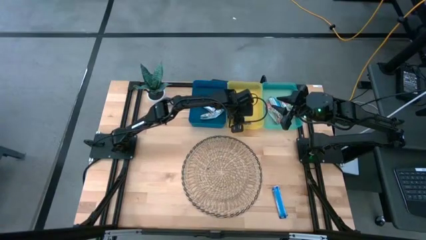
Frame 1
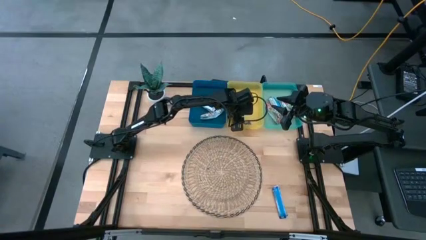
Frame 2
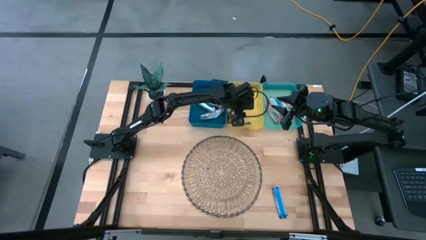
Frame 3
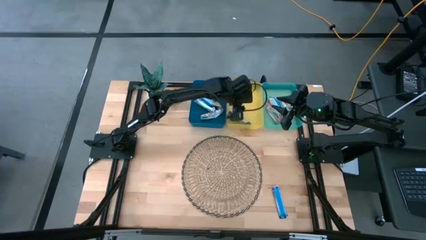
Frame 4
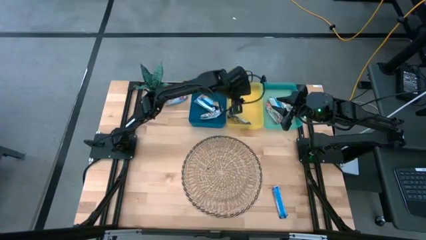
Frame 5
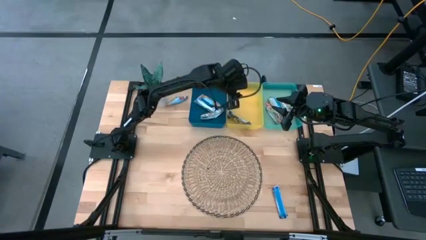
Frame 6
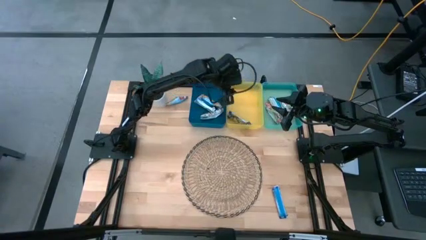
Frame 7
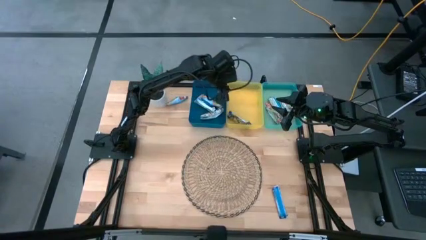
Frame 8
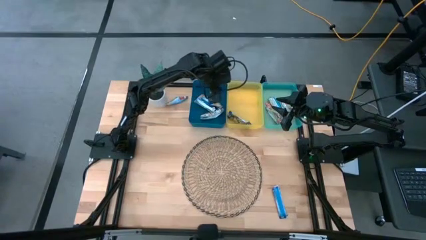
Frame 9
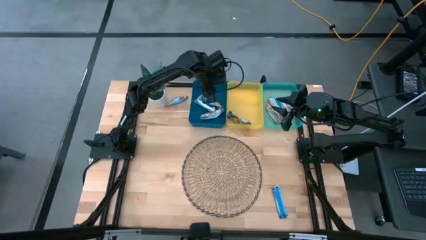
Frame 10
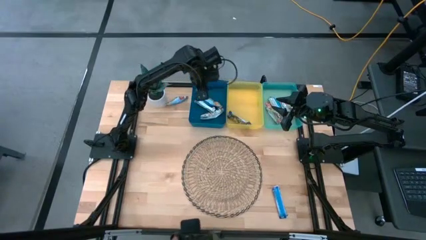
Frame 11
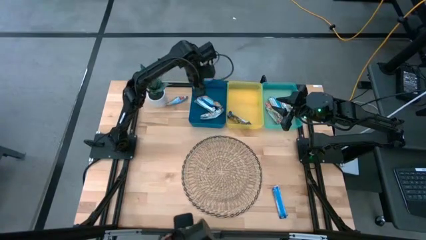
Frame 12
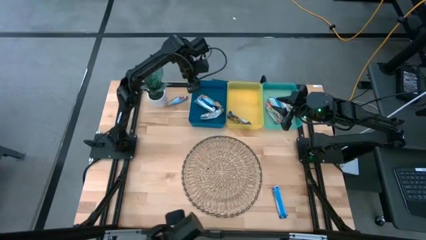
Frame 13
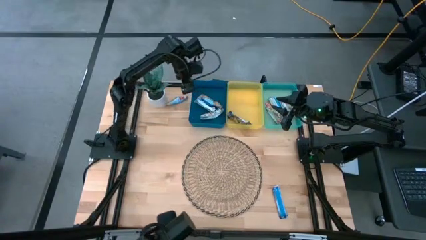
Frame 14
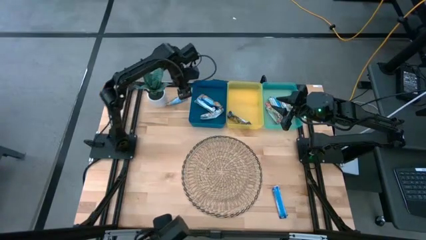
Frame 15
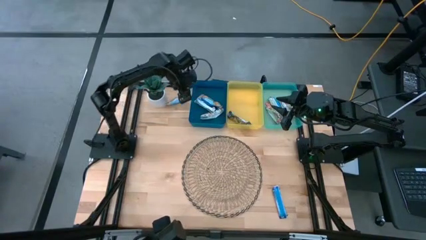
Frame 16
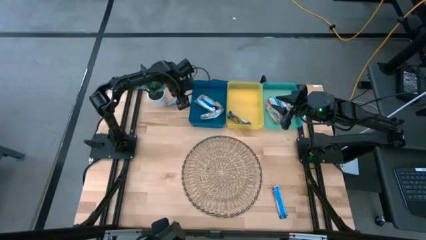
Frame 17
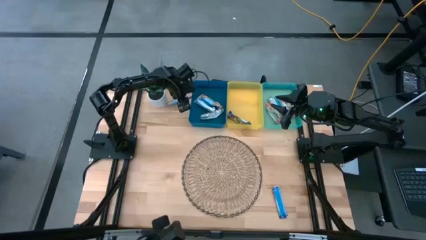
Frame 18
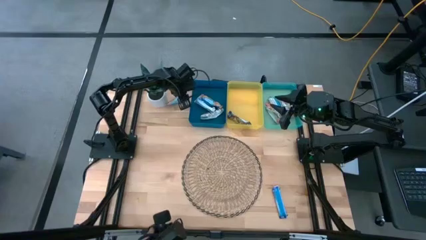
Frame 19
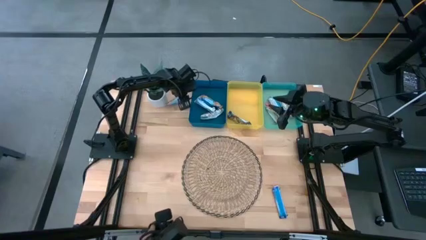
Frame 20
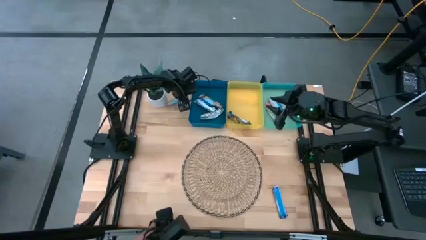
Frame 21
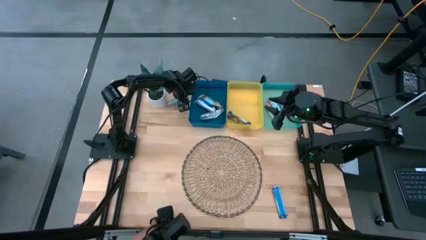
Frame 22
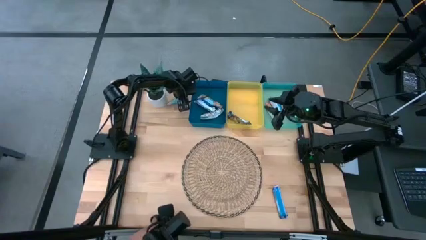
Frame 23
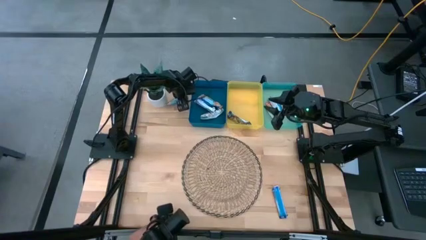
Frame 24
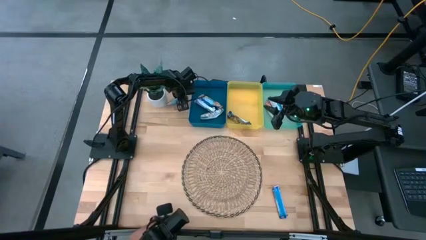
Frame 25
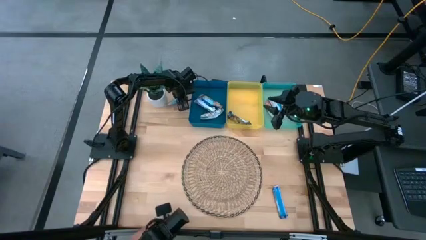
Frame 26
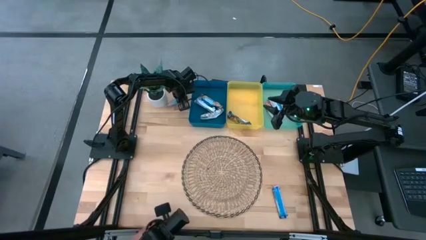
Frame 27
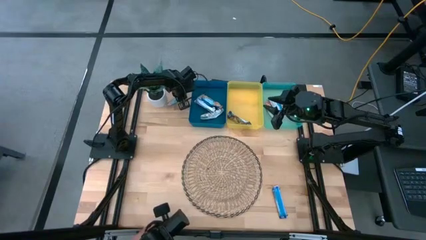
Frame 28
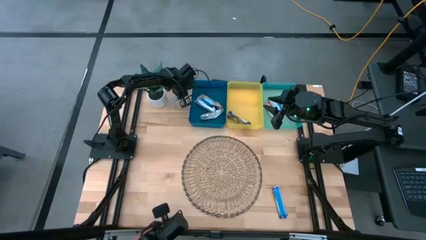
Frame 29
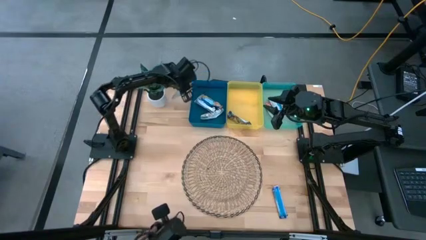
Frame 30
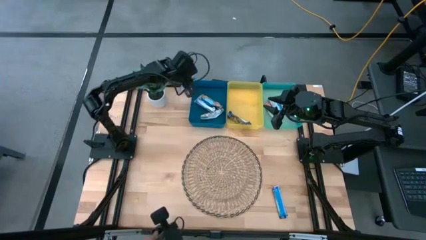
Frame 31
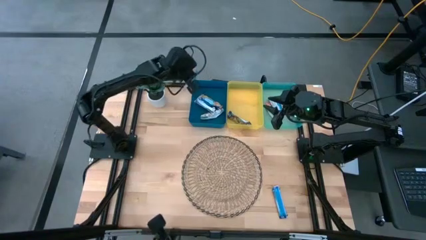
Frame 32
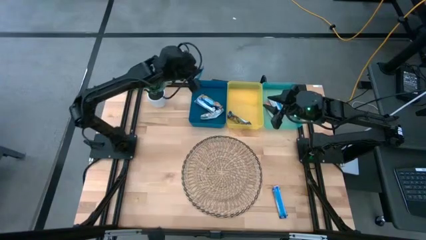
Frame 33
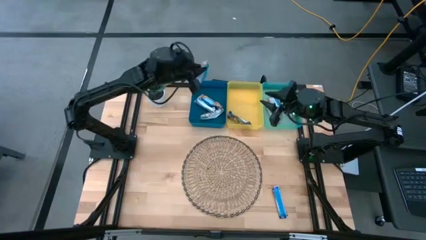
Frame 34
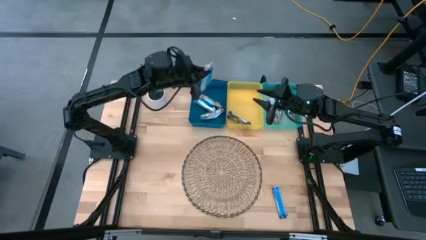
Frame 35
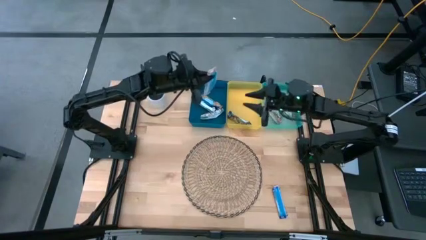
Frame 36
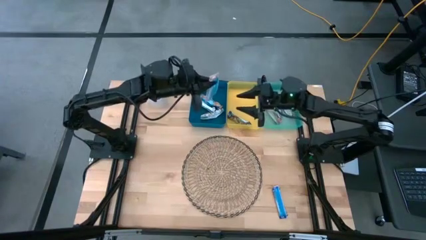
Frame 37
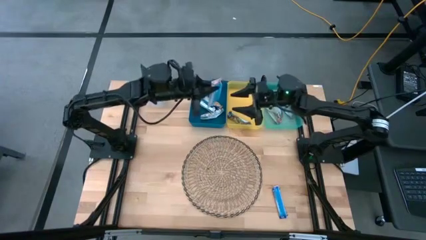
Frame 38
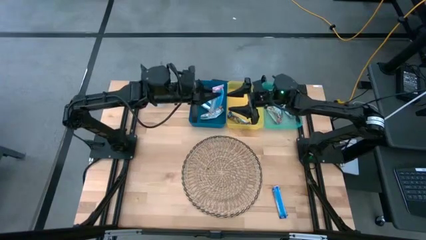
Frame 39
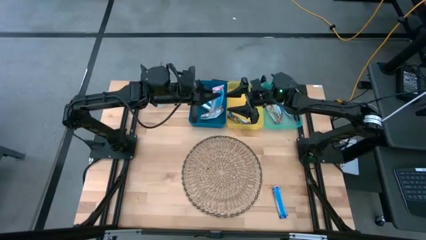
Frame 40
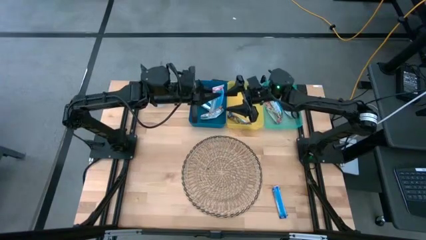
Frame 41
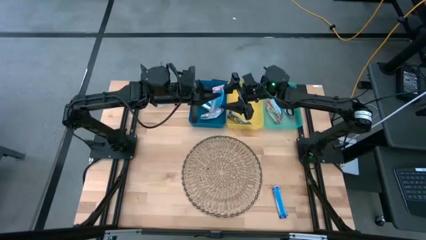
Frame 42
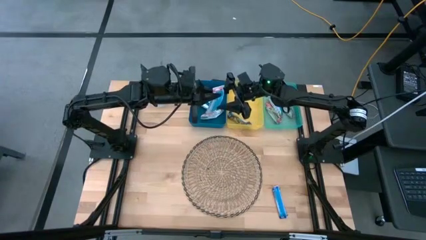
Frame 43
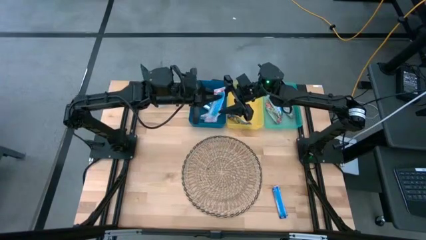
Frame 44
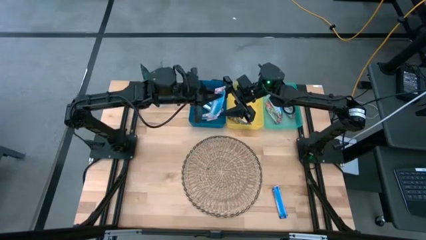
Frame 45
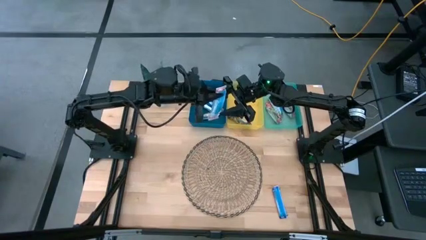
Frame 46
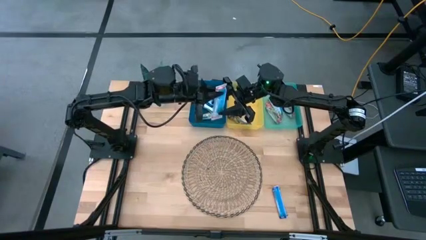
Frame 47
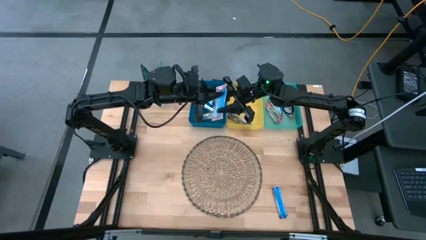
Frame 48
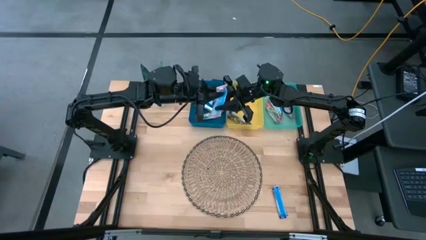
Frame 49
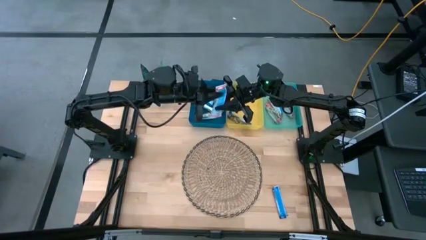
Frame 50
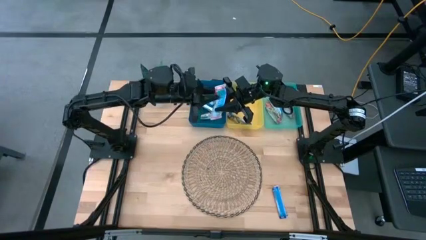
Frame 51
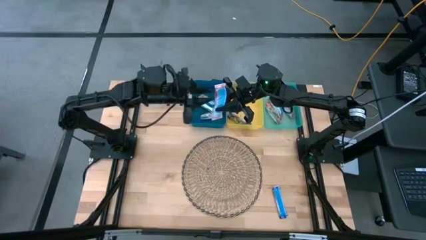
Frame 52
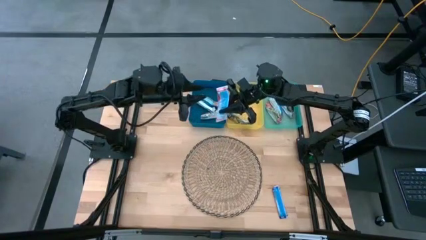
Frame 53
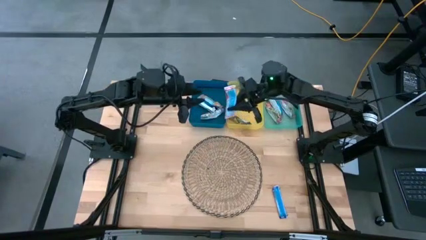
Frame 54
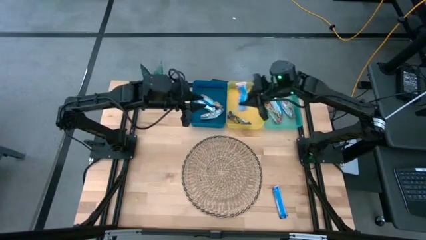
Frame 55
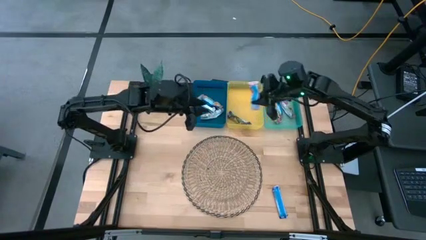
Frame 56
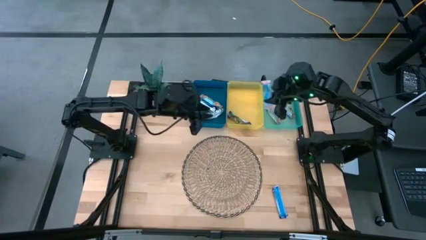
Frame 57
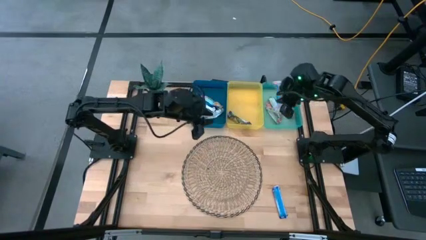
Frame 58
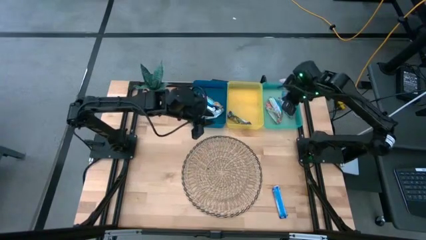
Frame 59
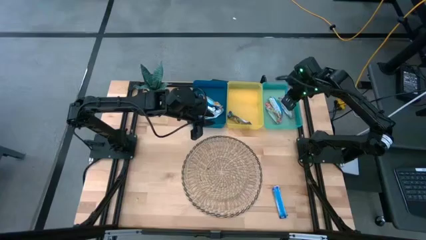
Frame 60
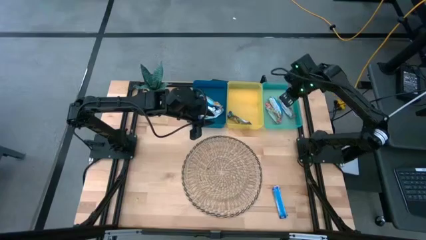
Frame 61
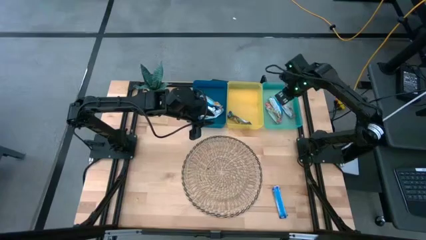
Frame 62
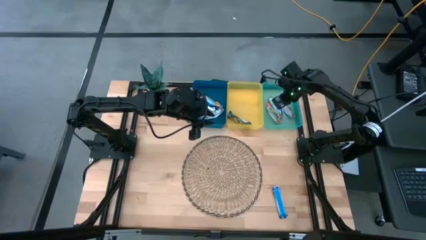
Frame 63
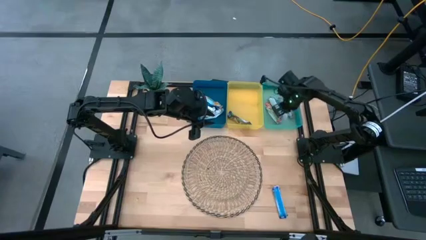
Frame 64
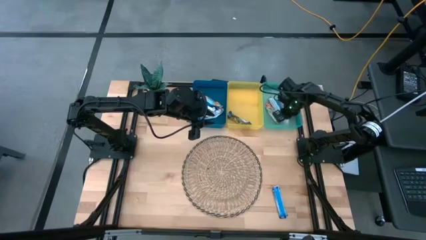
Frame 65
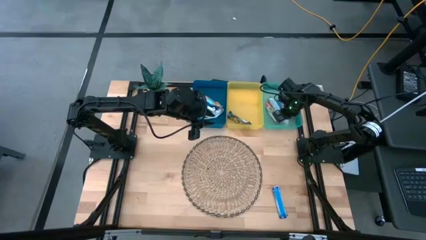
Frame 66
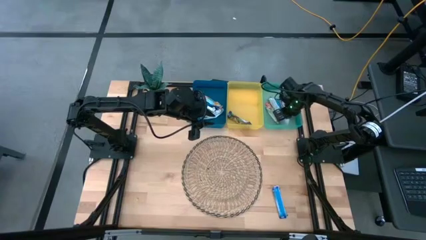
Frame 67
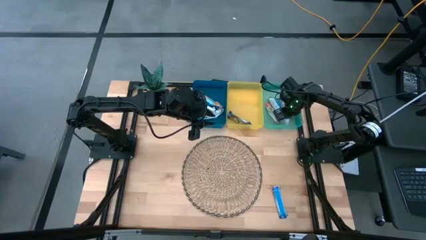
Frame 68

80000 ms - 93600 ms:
Task: Pick and place Granola Bars by type
Put the red granola bar into the green bin
